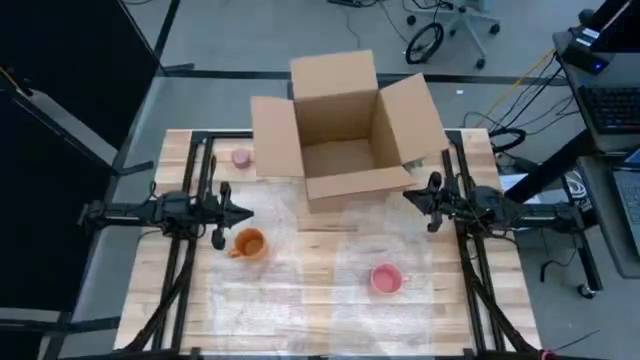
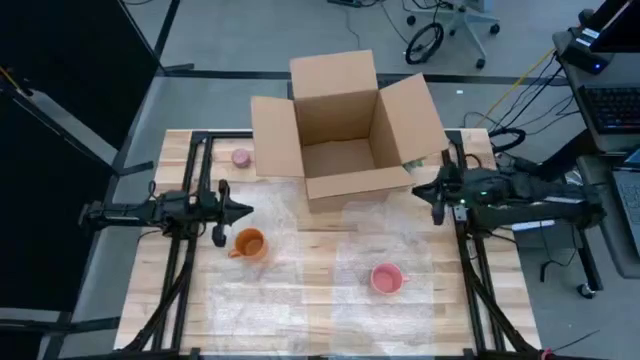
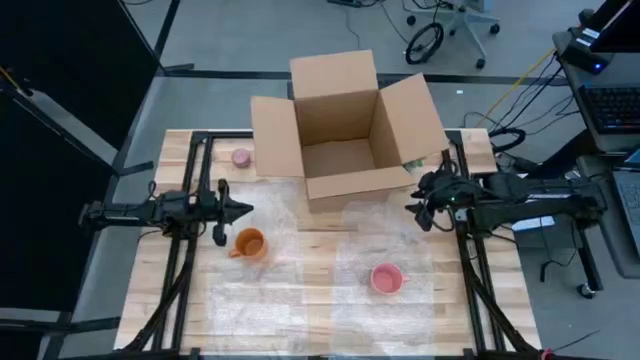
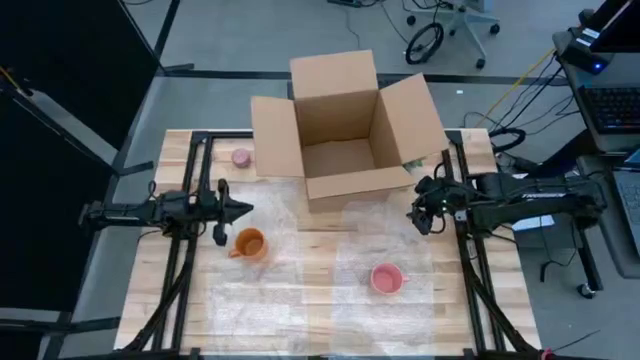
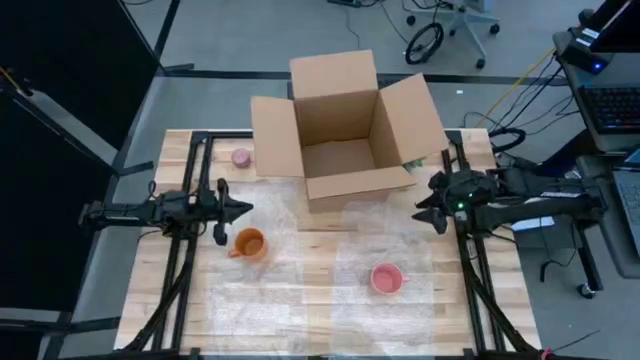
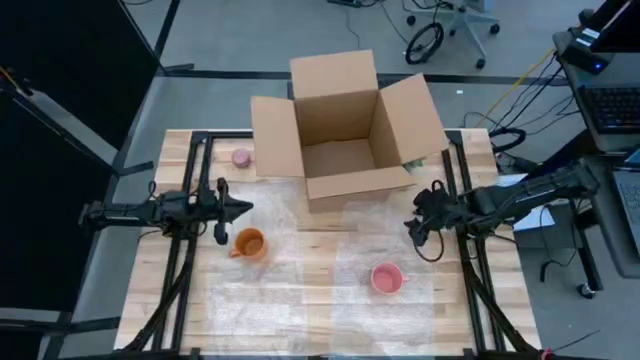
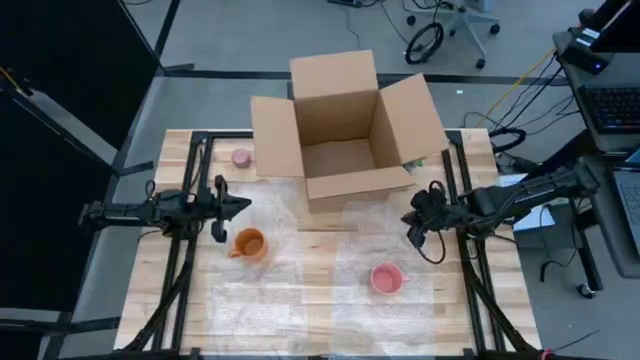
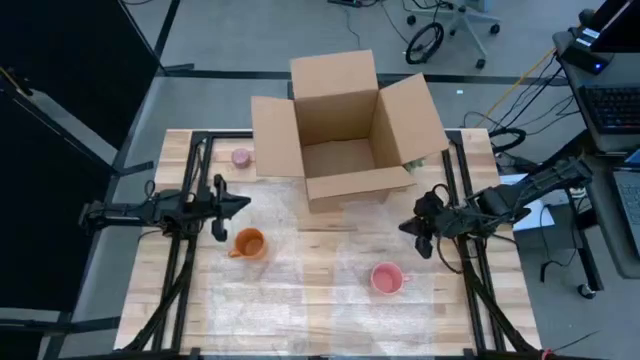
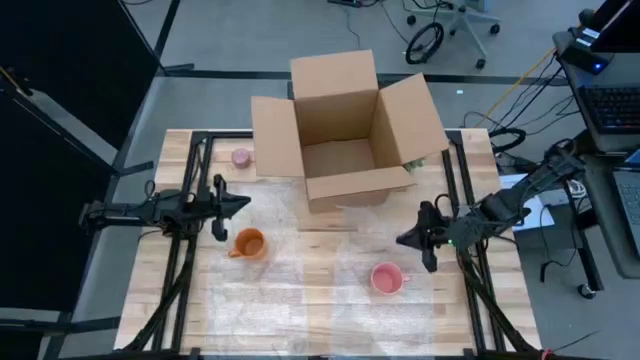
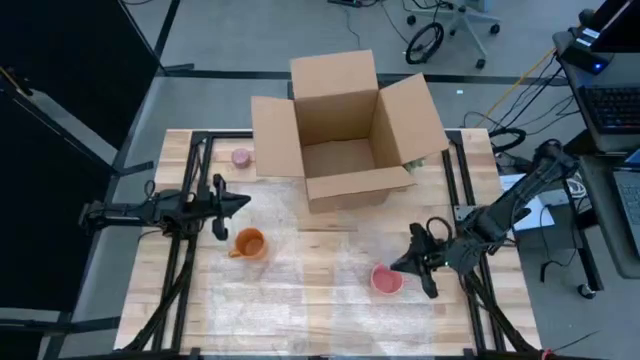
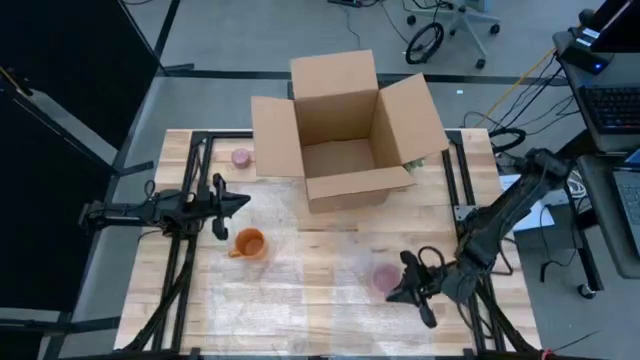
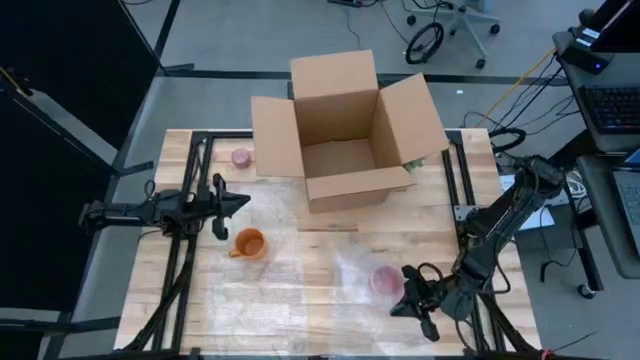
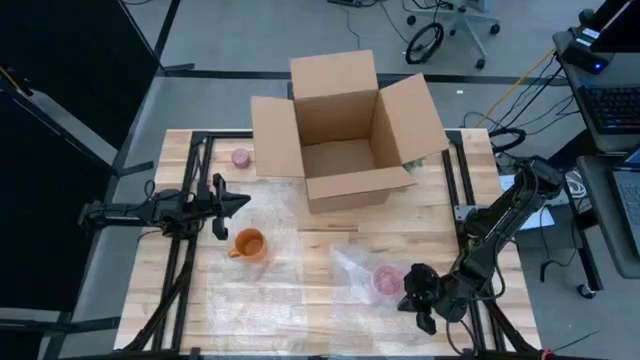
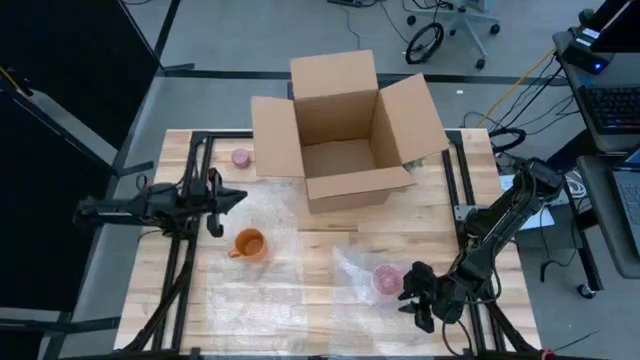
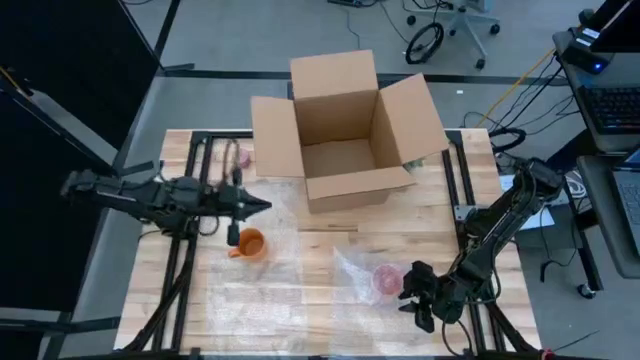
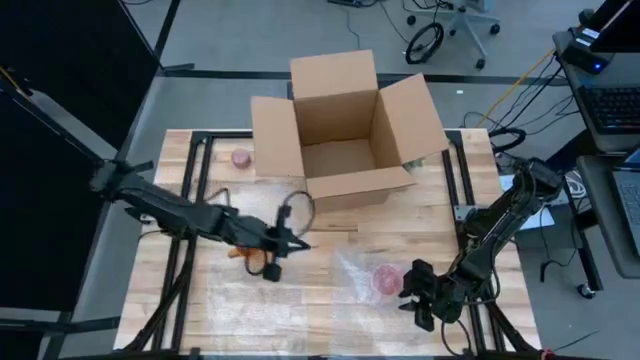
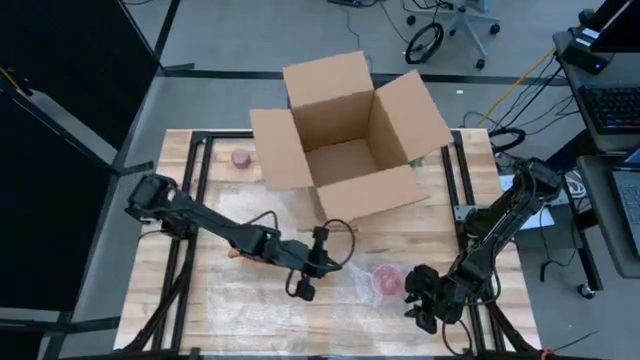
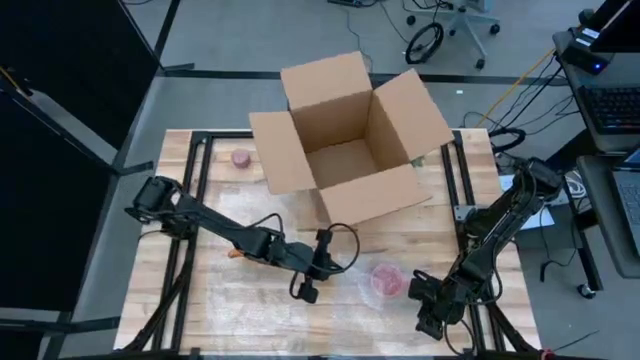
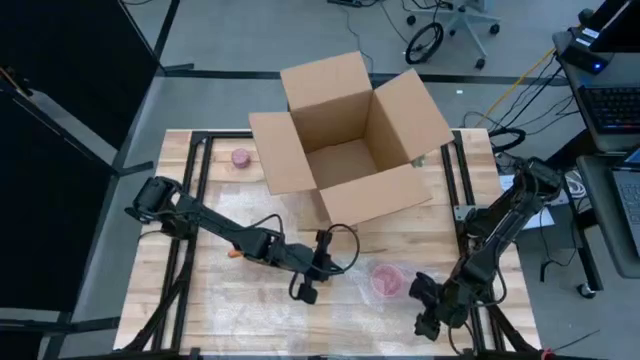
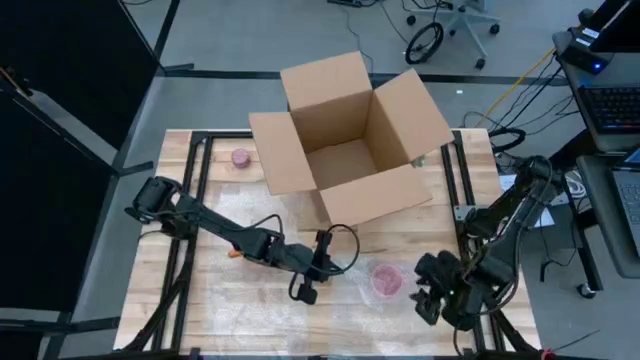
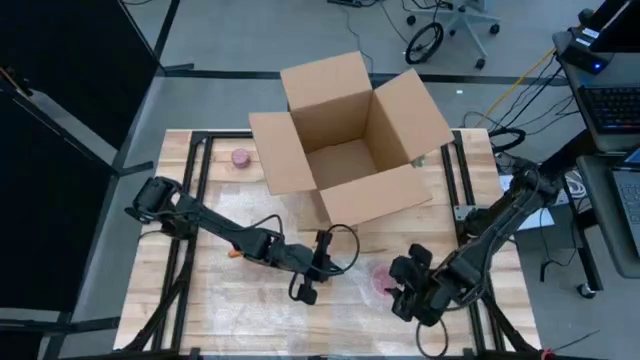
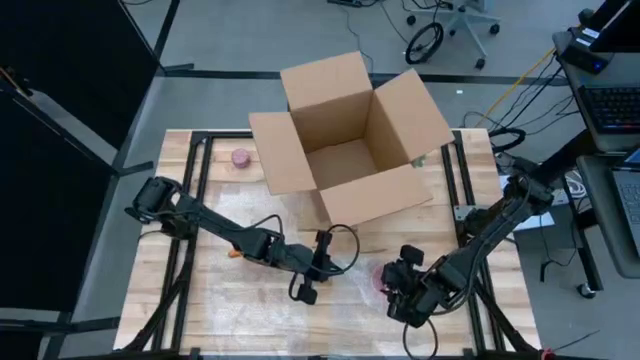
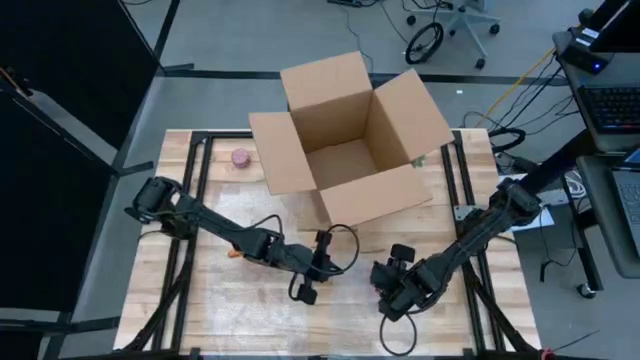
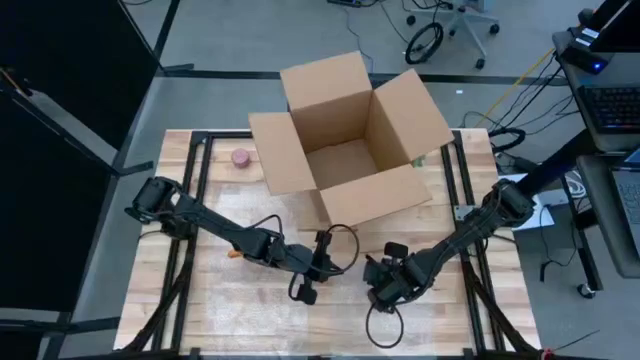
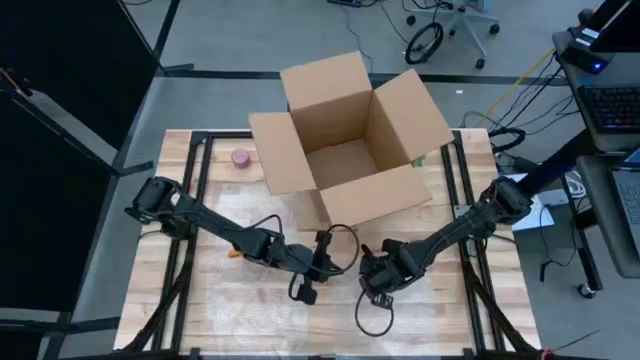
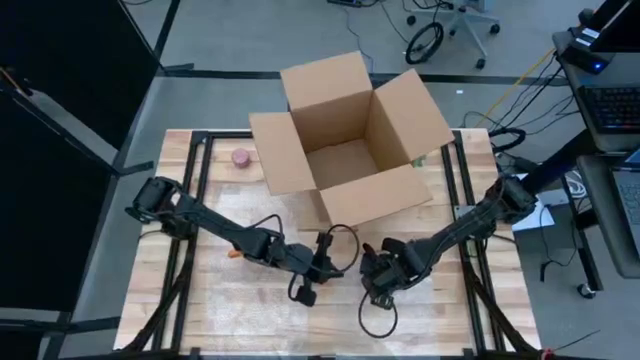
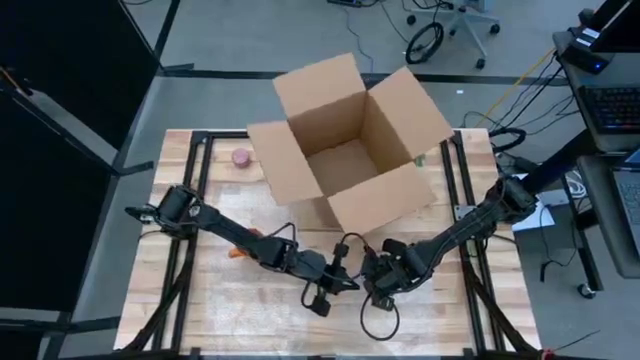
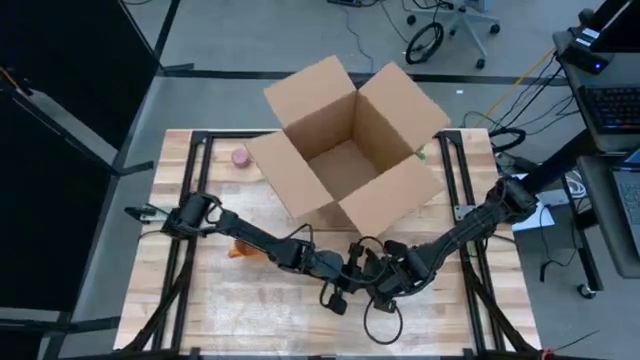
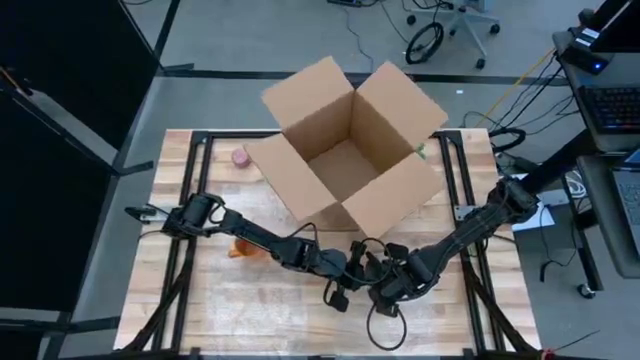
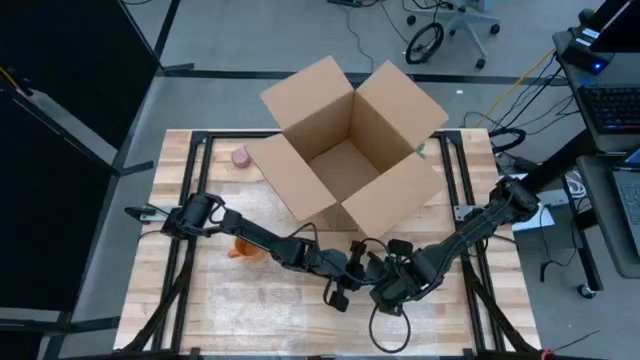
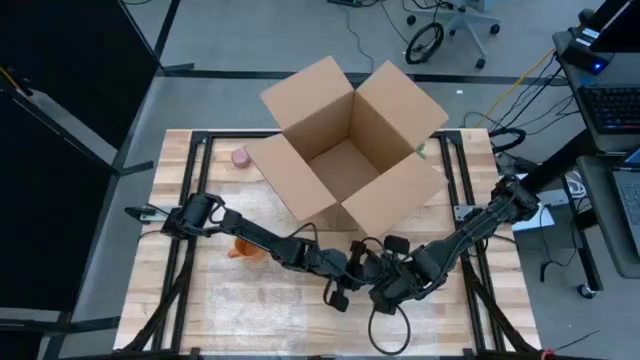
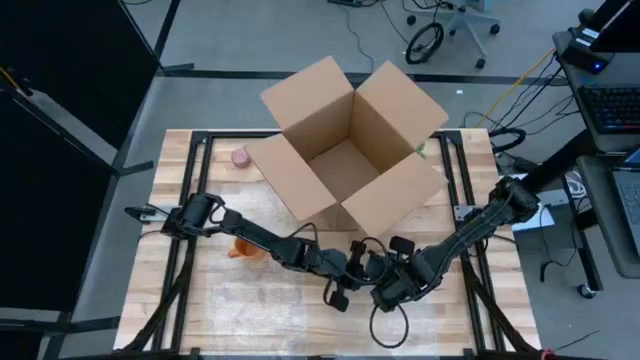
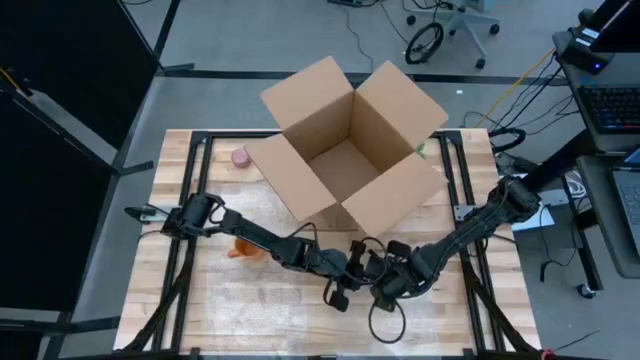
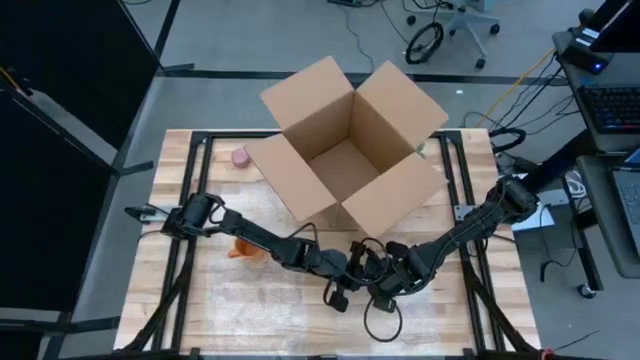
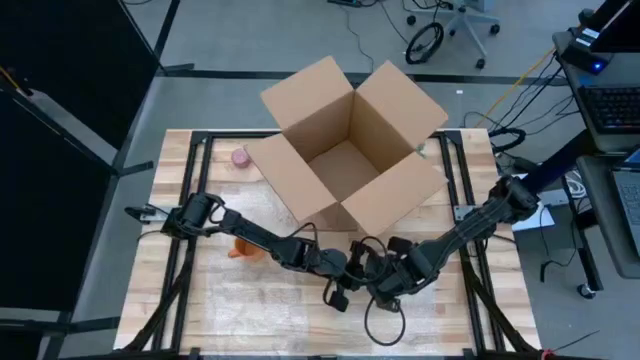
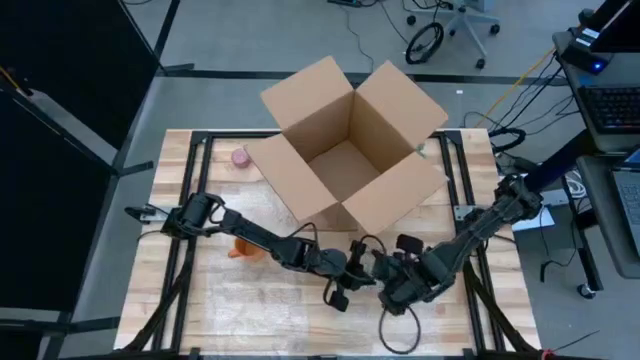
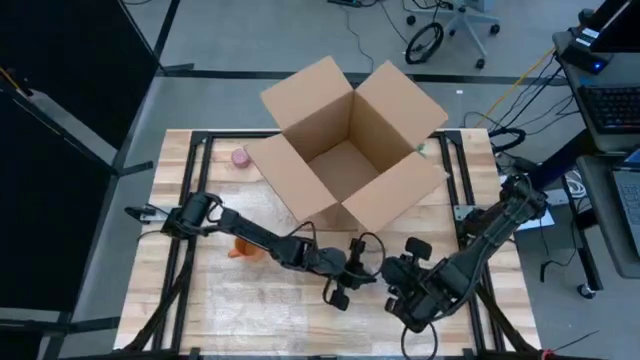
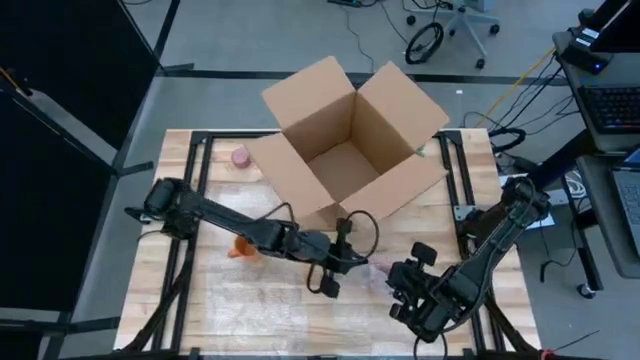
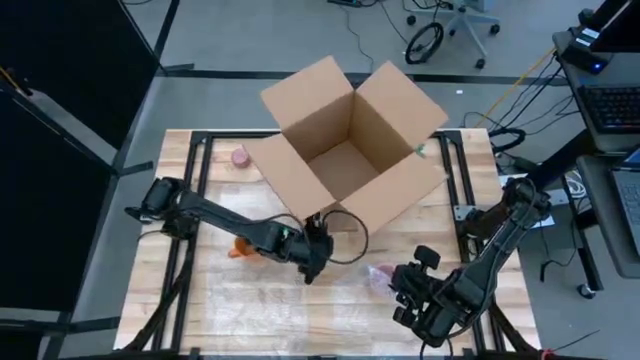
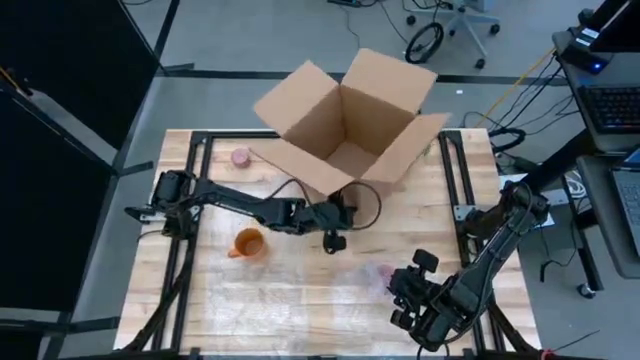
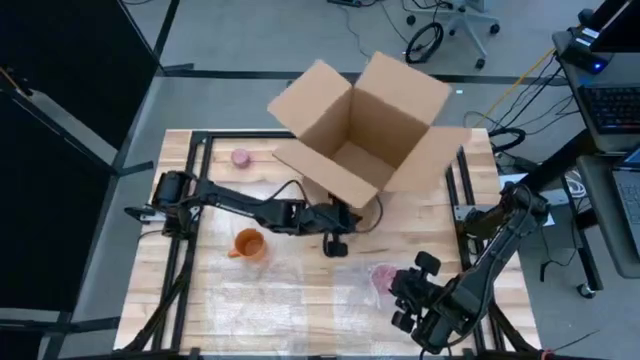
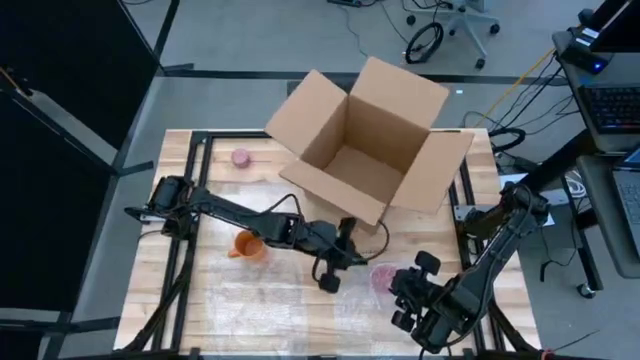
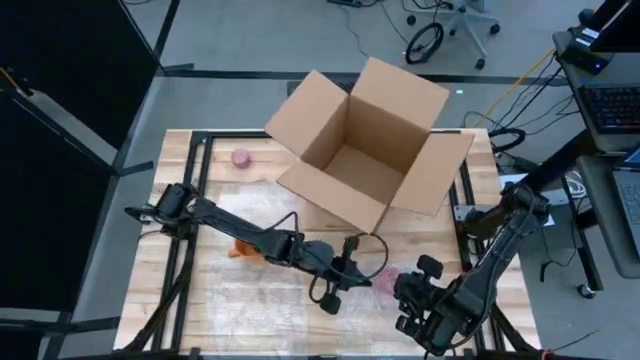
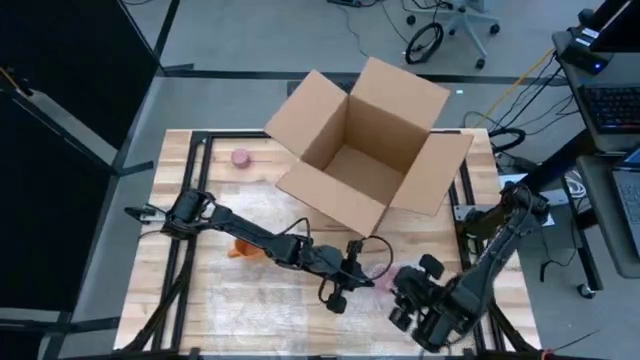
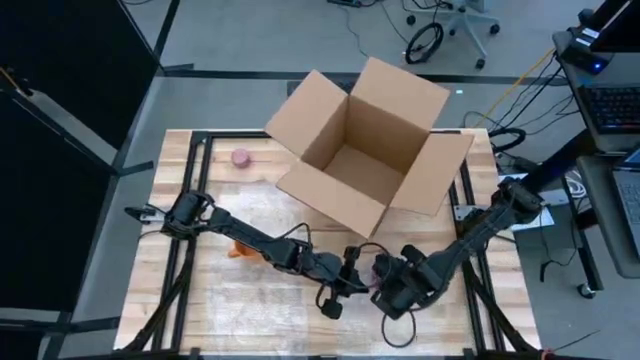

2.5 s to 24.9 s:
Task: wrap mug
Wrap the pink mug in the bubble wrap
